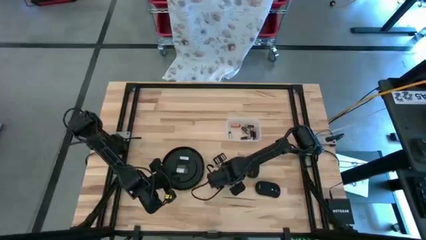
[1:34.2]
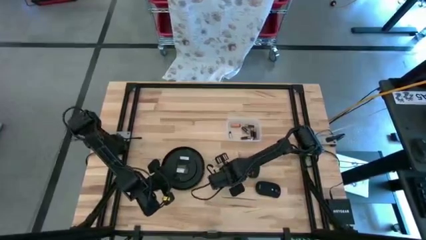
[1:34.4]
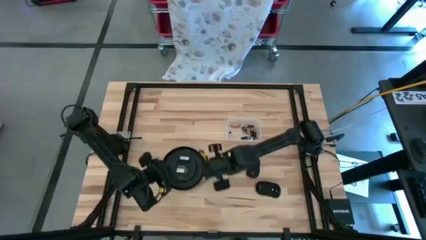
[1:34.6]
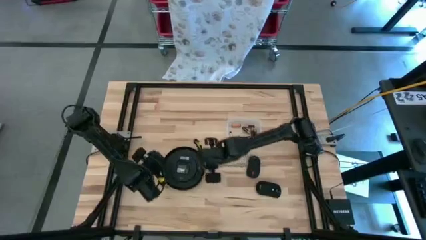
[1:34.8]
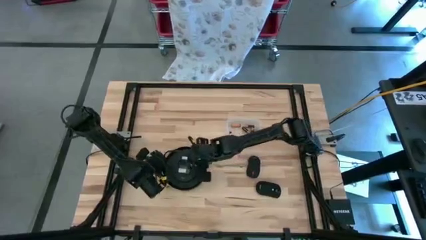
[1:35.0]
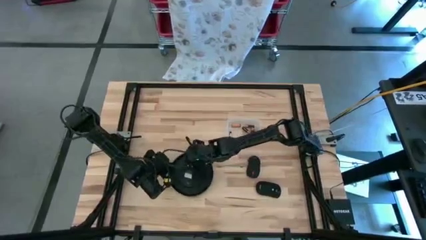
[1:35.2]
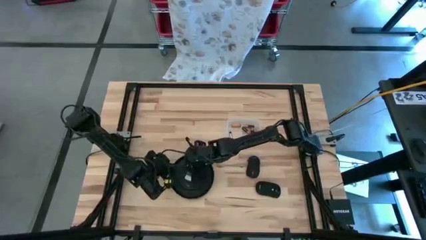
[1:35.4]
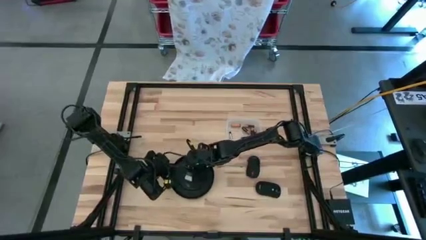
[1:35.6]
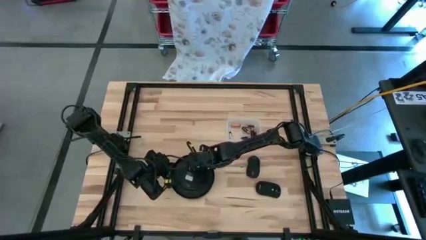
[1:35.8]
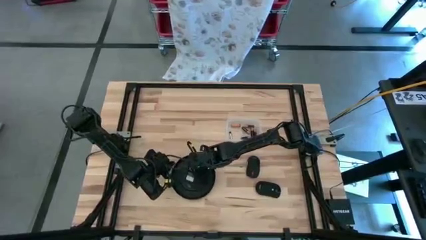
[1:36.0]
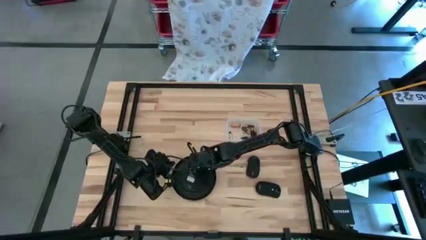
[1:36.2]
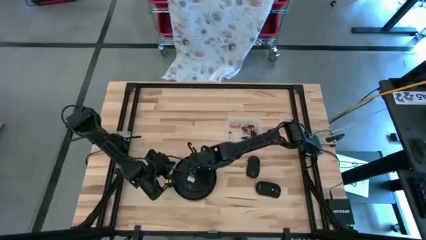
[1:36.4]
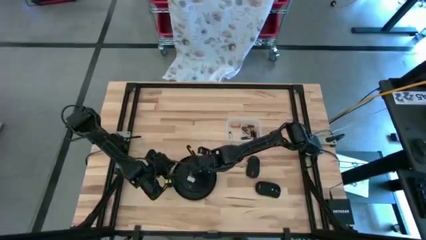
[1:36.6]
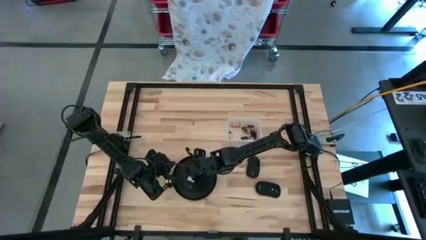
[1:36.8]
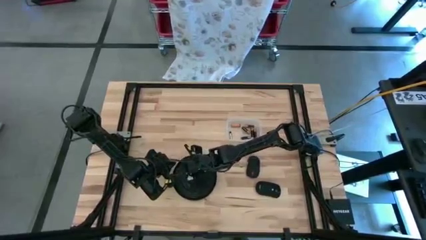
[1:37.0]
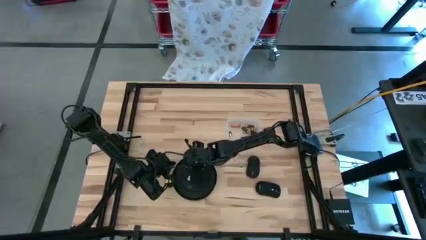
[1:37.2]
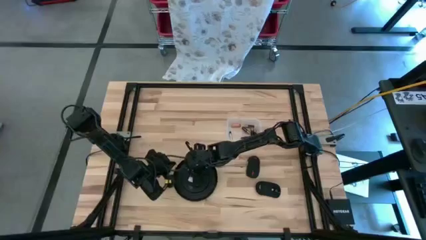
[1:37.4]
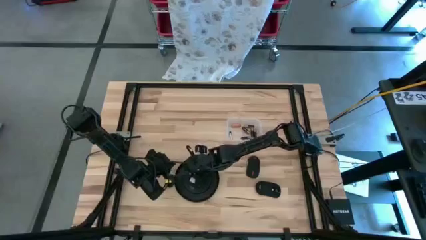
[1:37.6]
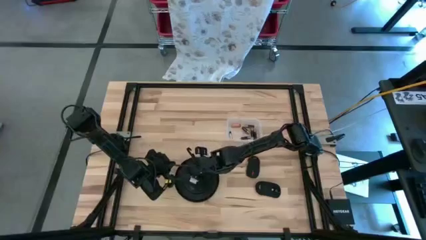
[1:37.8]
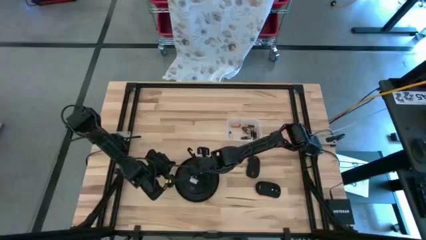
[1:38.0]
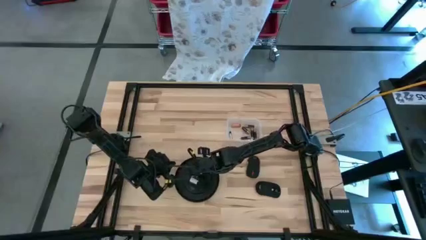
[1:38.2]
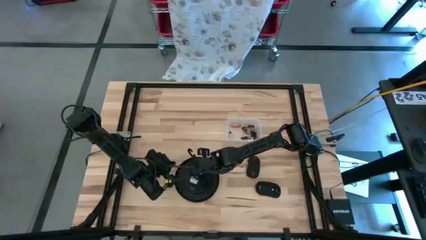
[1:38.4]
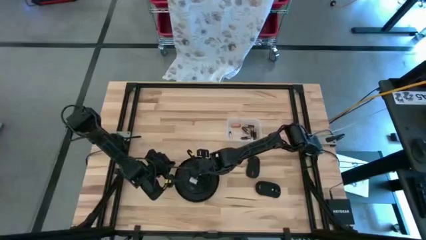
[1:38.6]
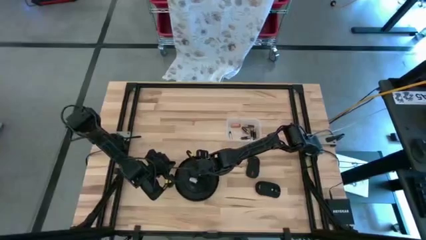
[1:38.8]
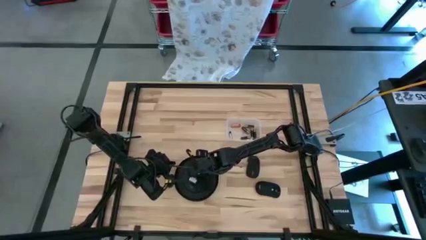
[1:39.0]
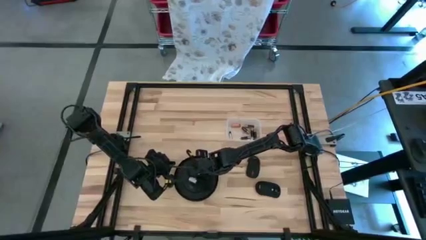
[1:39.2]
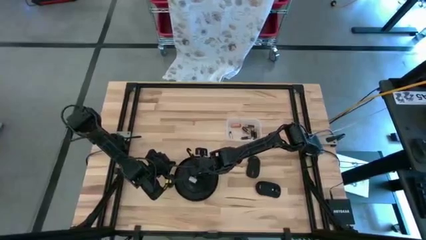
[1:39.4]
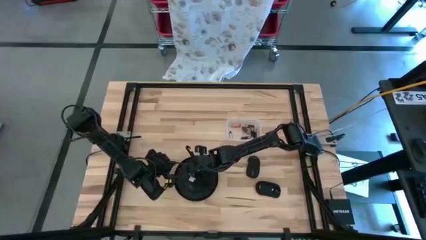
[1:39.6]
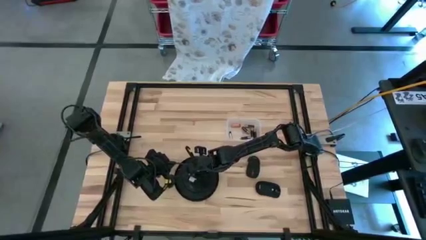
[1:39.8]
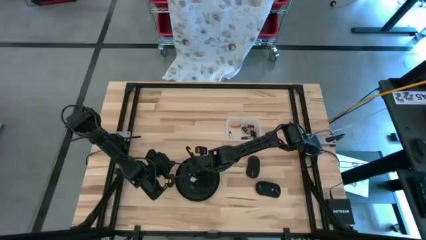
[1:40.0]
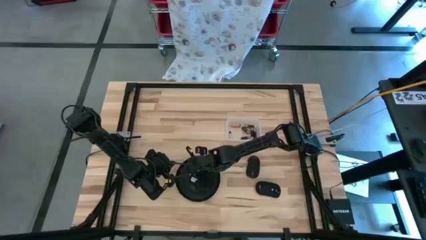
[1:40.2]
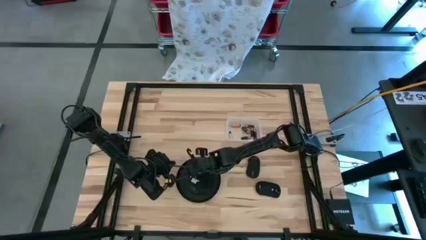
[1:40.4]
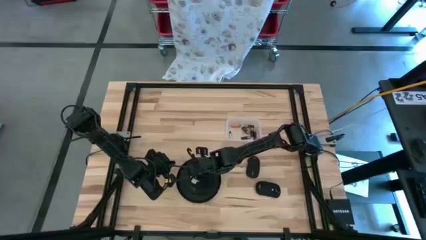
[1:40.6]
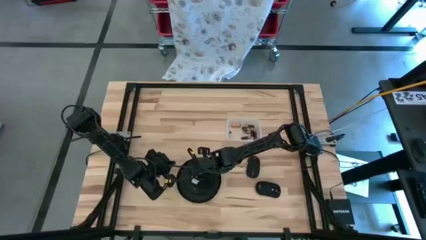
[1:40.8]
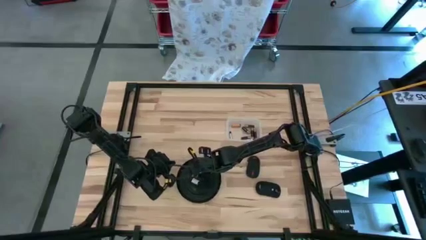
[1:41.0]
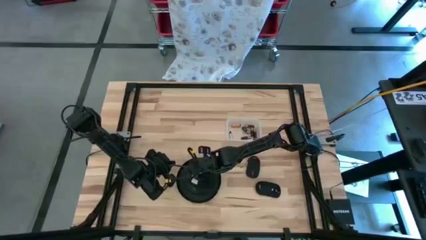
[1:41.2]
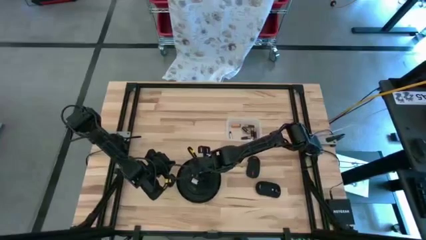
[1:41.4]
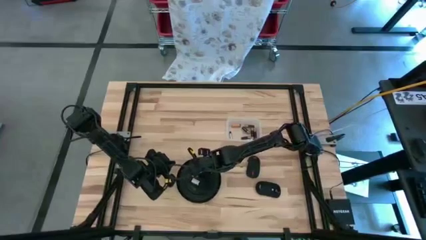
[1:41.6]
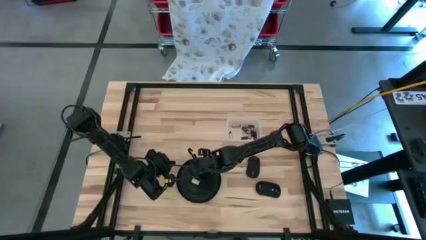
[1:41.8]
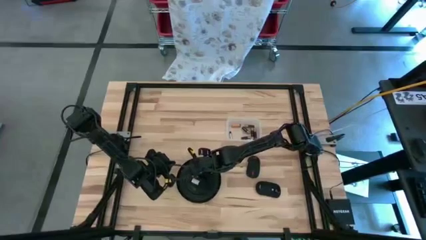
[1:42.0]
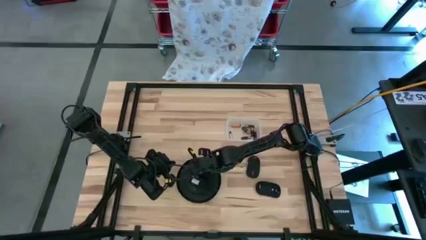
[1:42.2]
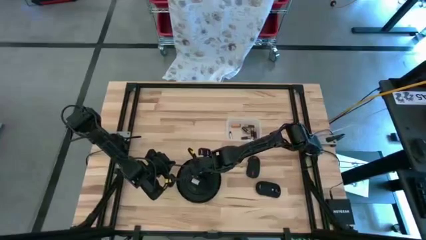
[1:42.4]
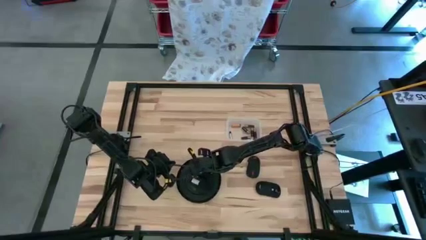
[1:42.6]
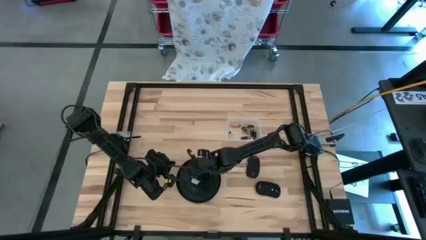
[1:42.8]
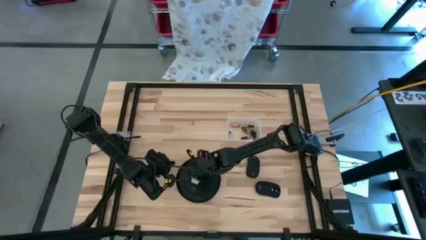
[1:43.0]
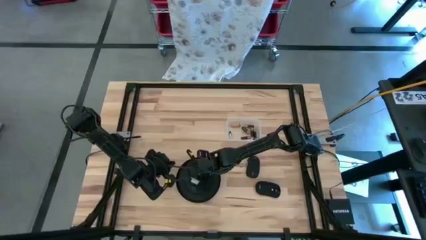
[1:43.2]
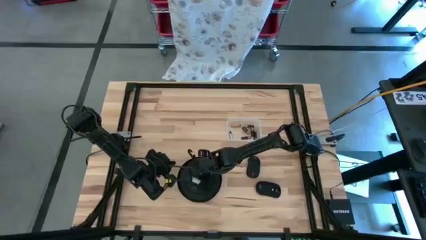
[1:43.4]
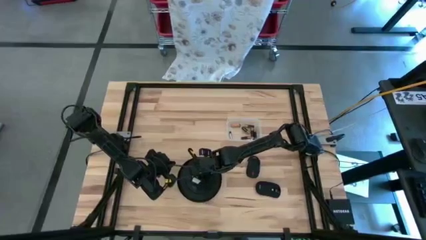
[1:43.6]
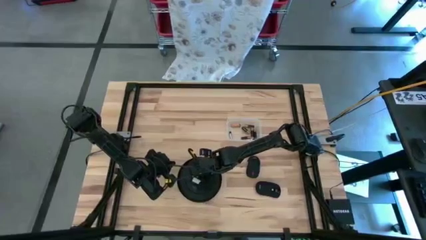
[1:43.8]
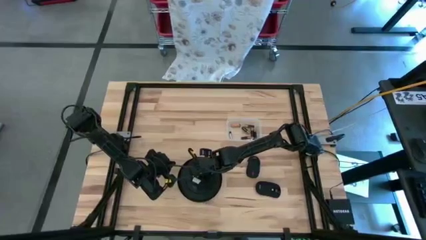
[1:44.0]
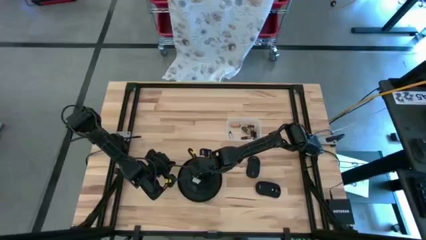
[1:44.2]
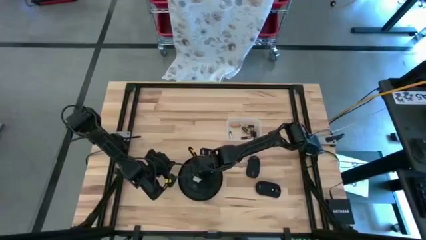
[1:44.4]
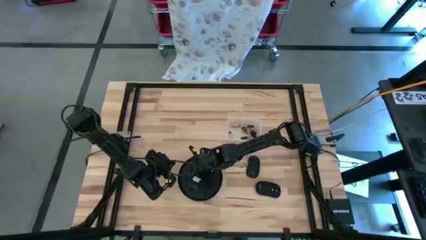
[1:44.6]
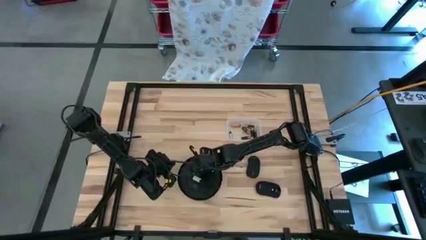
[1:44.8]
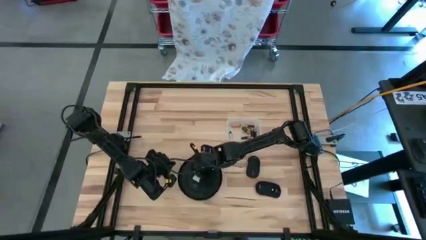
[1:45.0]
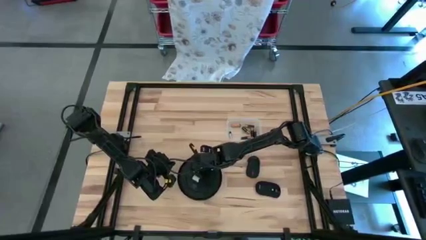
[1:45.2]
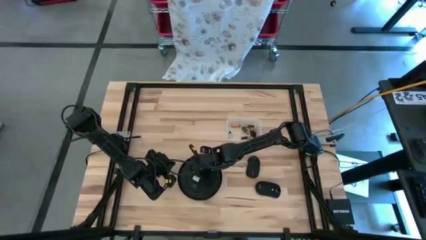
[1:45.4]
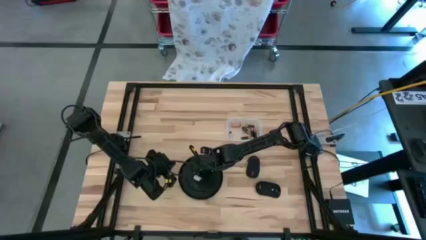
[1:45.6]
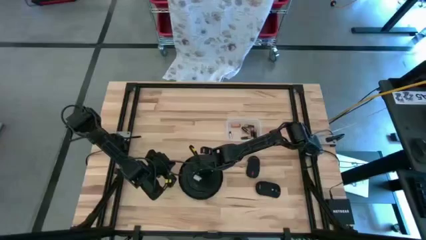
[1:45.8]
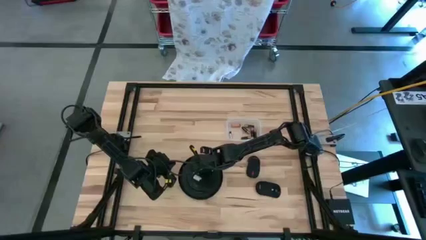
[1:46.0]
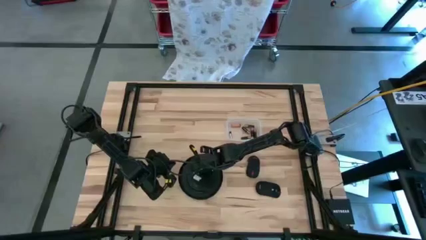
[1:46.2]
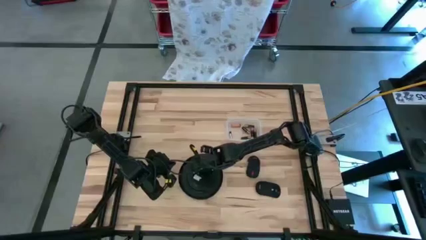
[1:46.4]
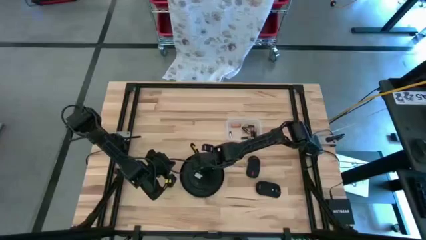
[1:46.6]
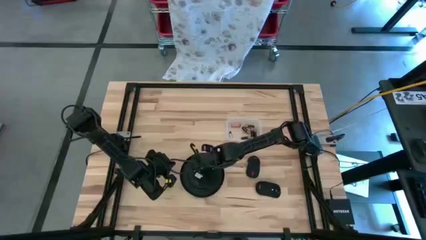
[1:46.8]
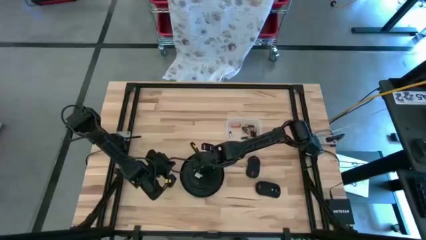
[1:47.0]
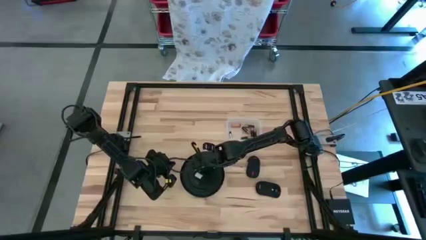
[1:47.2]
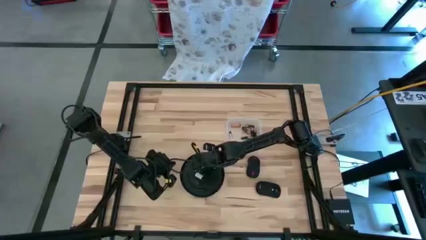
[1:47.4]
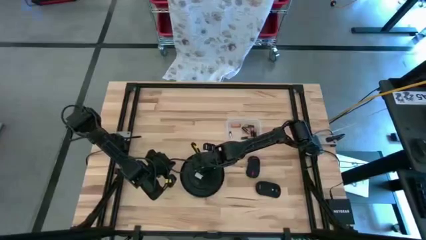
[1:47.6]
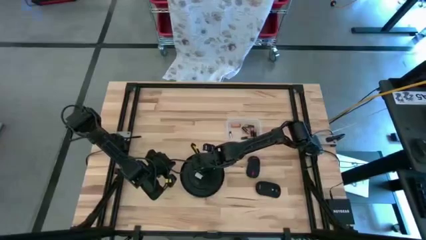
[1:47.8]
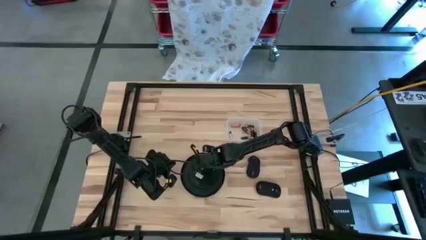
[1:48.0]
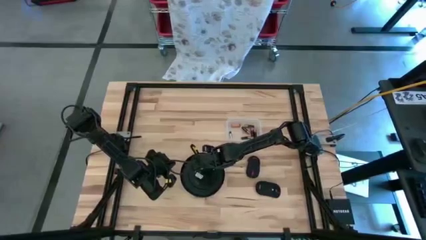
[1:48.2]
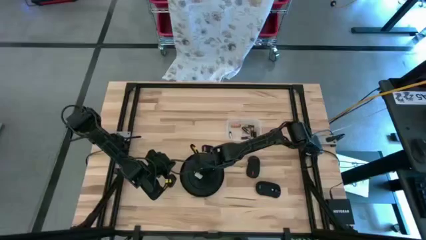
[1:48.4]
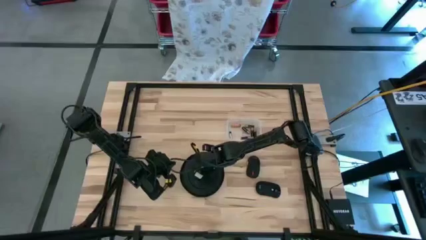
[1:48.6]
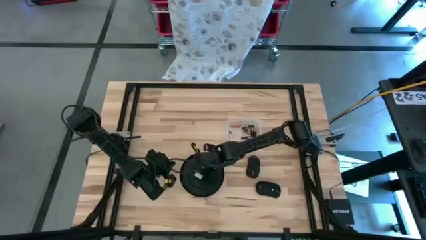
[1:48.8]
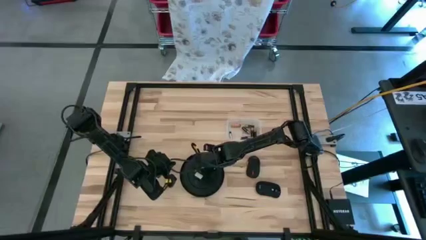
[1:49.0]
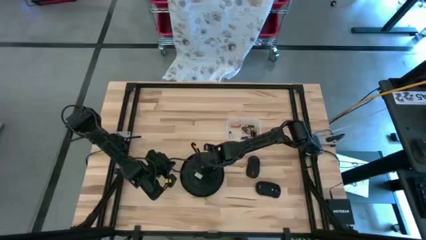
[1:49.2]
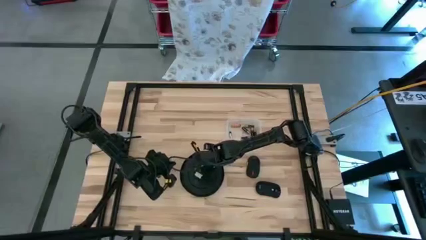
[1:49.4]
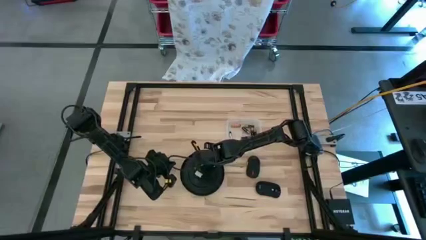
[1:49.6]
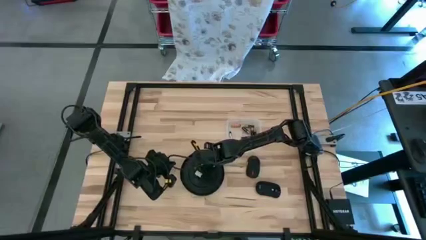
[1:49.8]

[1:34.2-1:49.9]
Task: Insert battery
Insert the black battery into the wall clock
